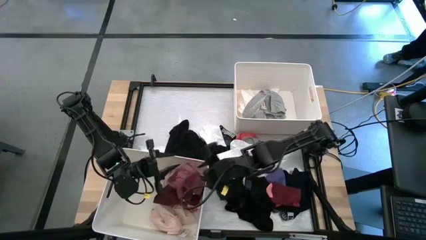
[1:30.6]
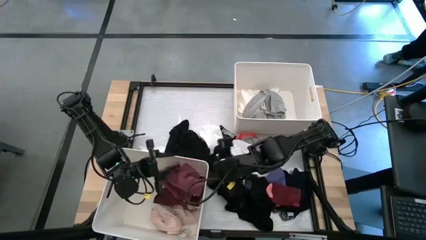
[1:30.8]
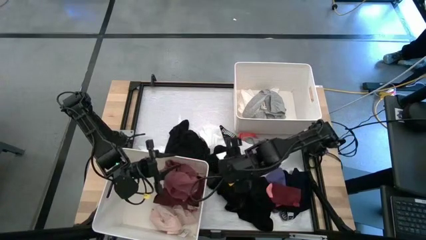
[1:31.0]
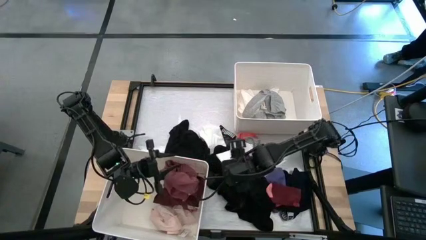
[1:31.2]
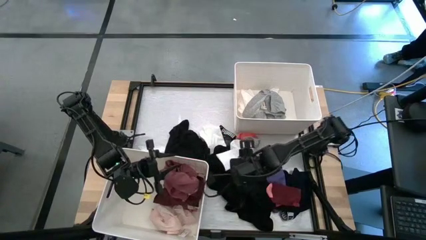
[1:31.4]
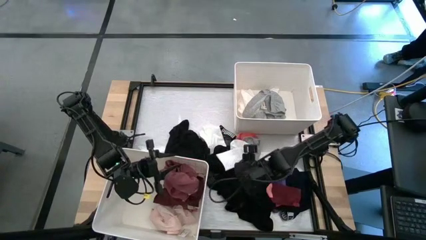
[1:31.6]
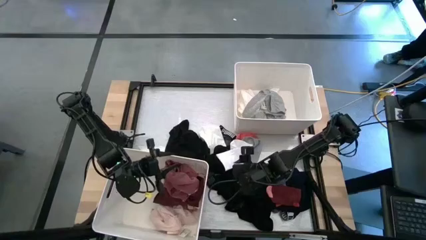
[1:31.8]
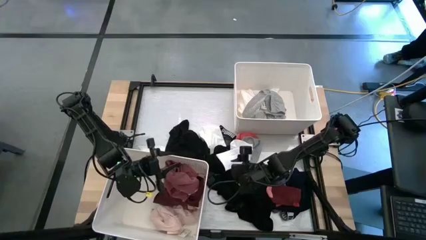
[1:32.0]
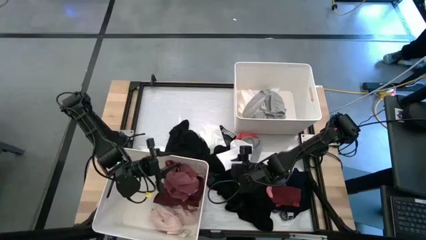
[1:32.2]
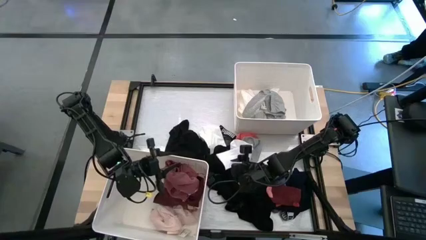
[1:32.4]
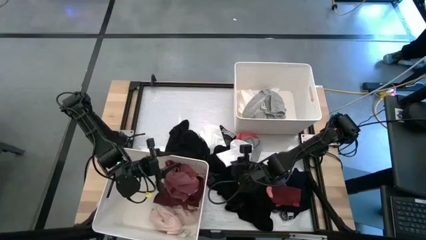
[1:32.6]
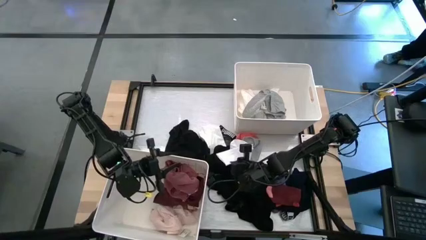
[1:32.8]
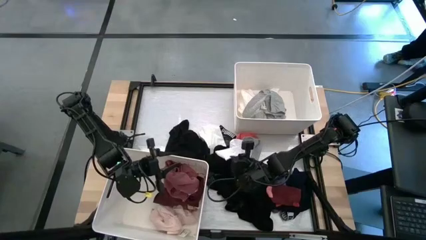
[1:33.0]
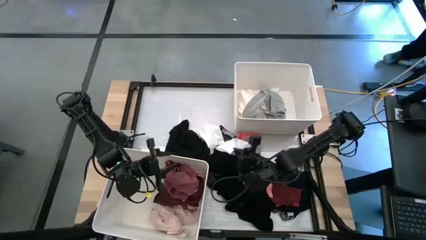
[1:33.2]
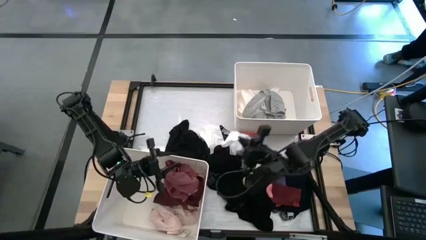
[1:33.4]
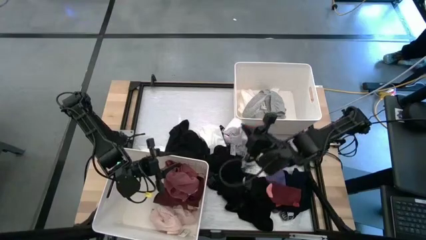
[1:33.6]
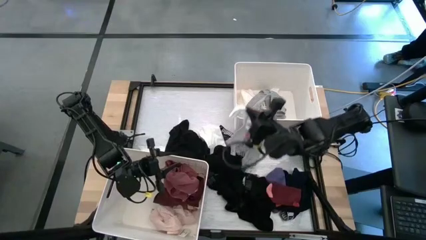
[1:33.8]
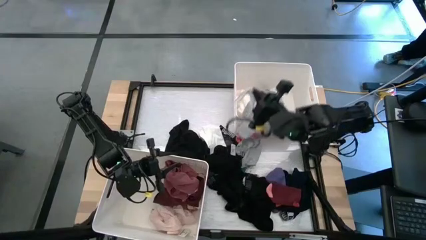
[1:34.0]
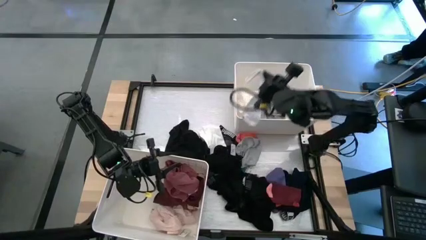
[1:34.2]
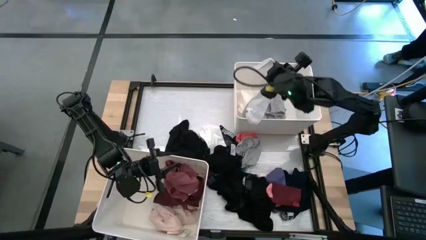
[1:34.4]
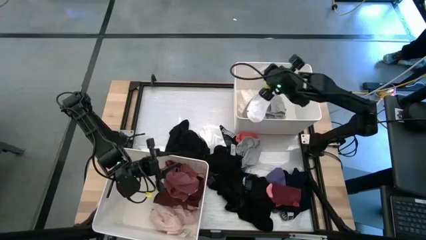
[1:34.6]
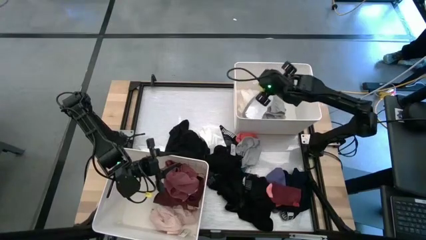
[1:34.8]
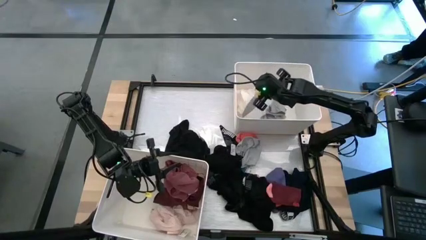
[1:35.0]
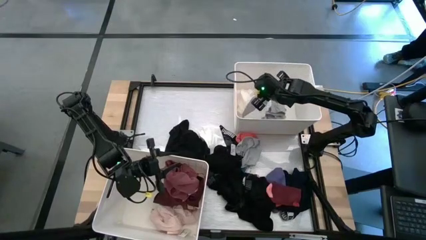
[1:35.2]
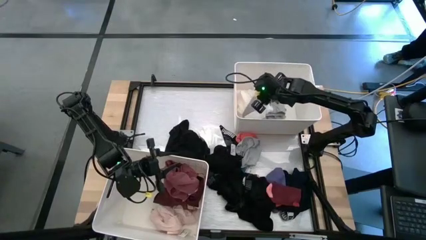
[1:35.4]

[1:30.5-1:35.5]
Task: Sort clothes
Put the white sock into the top white bin

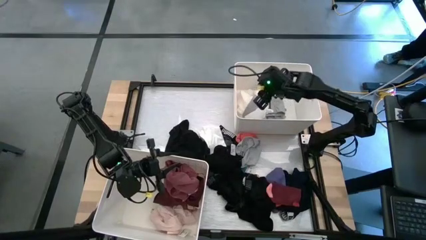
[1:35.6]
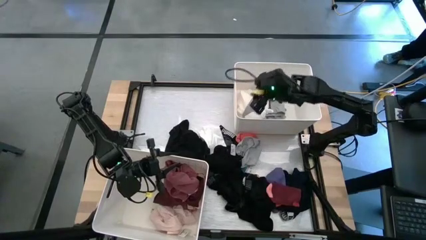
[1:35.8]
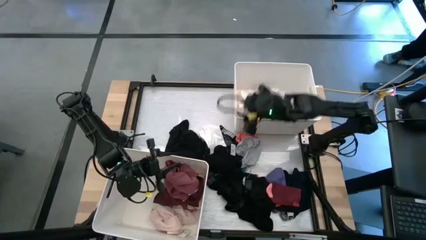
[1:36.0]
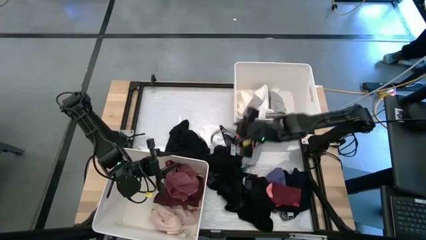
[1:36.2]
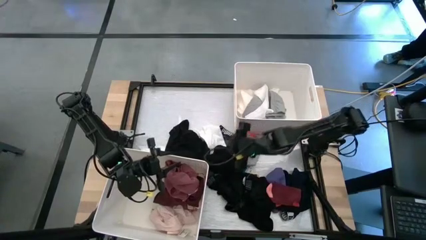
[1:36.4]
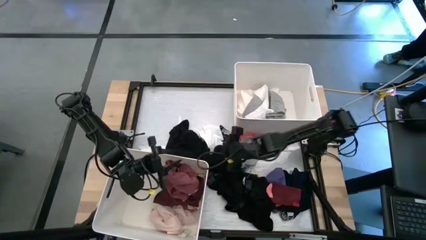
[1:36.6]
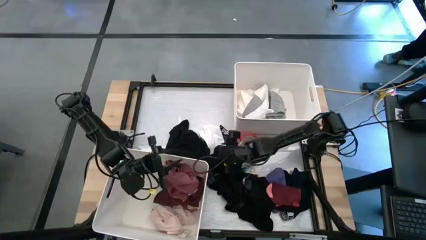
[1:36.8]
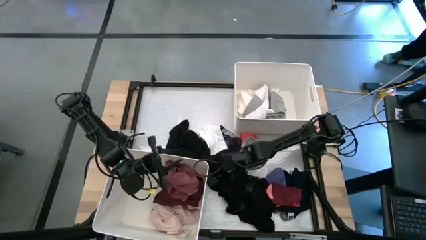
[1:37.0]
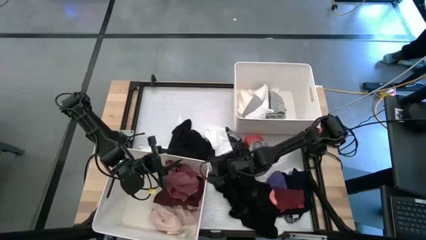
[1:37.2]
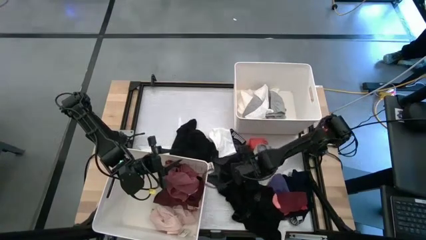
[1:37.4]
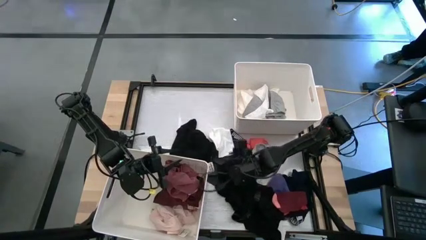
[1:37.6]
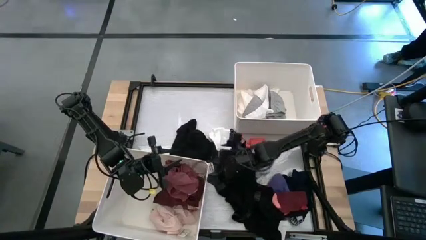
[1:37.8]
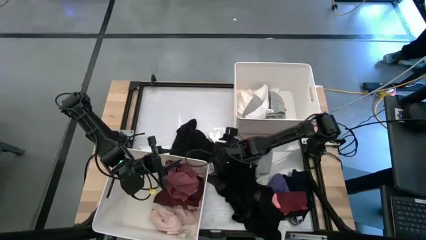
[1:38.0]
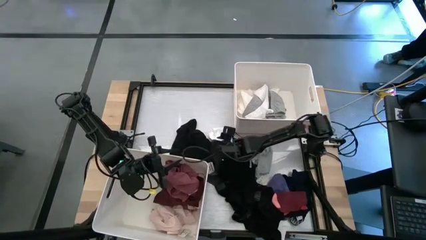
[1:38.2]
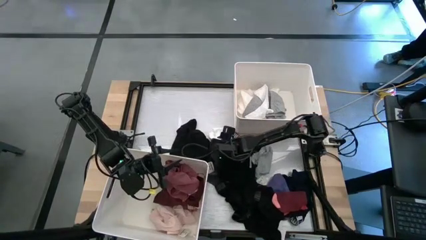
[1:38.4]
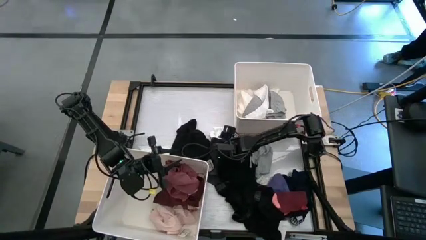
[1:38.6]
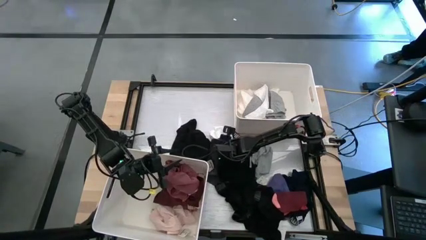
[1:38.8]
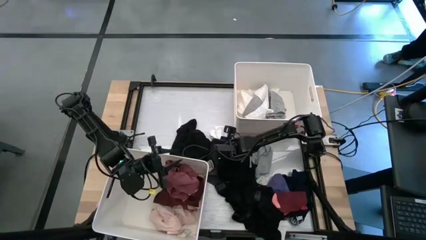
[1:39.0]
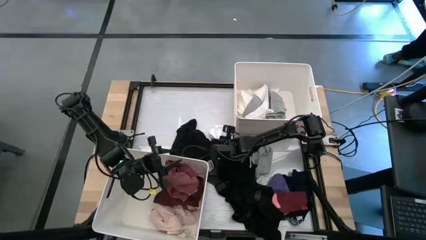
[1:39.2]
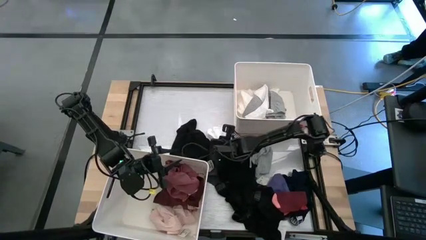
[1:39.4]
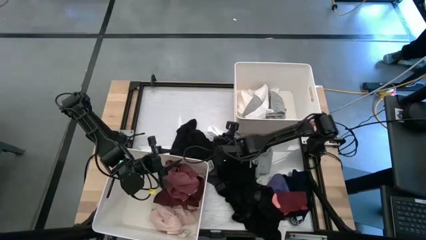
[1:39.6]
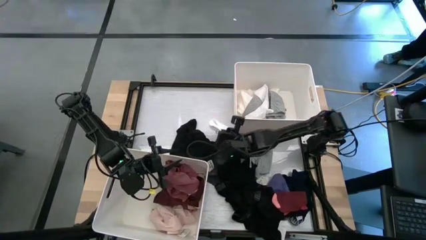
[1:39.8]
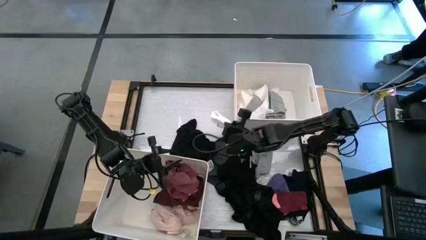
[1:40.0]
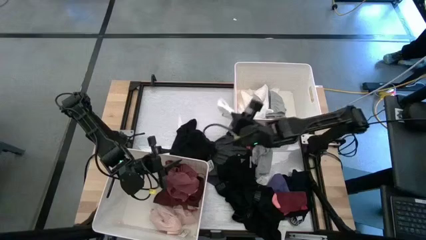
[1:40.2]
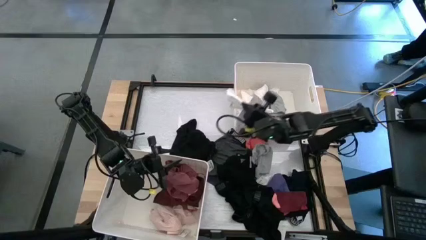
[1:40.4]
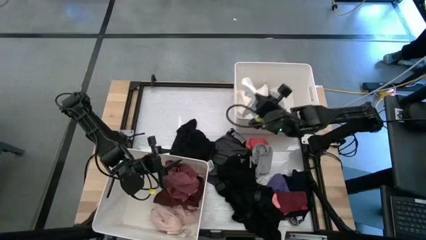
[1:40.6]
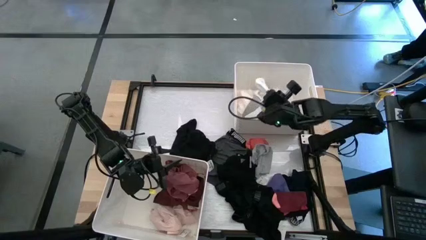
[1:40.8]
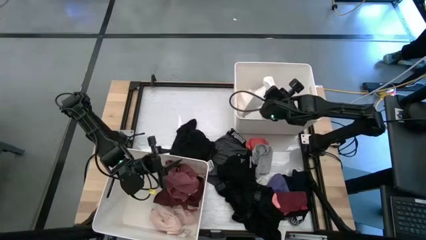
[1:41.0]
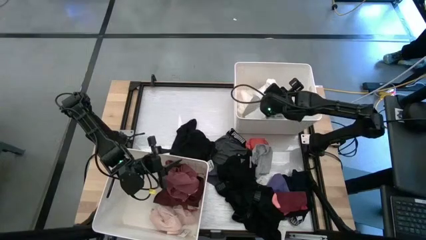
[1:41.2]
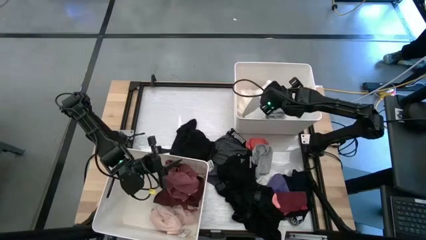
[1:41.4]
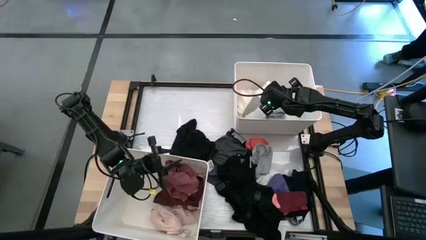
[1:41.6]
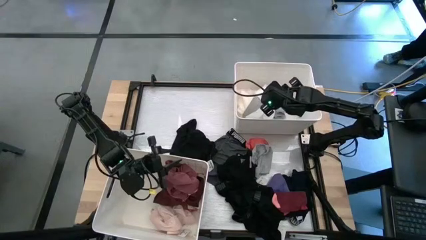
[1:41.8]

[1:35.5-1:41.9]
Put the white sock into the top white bin

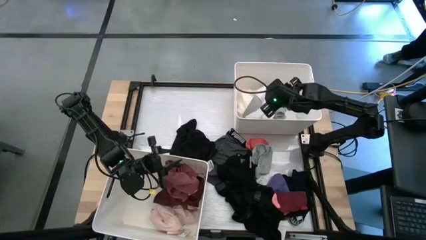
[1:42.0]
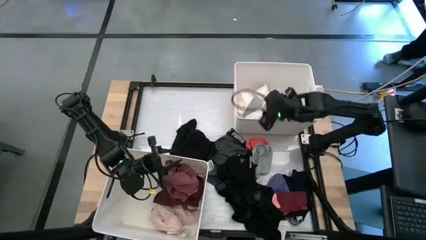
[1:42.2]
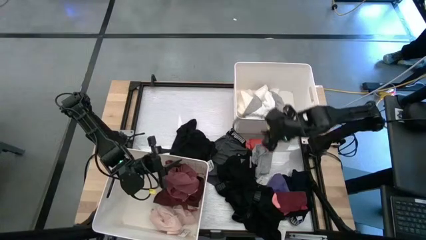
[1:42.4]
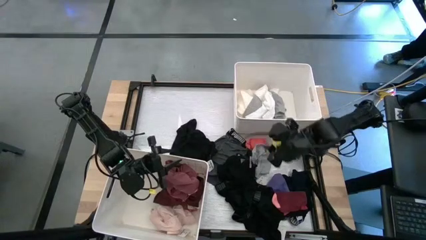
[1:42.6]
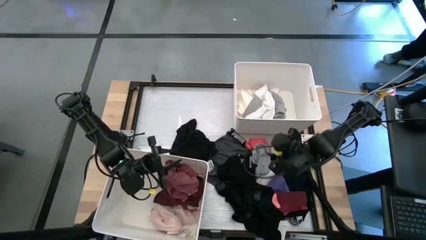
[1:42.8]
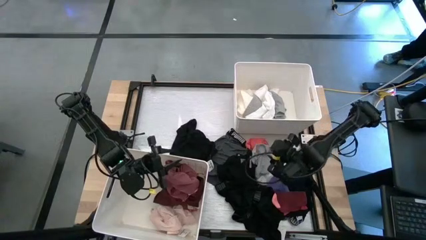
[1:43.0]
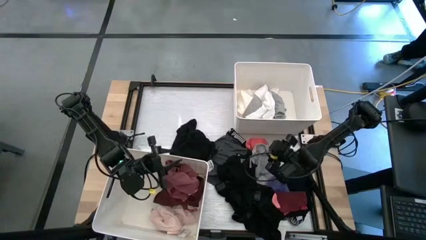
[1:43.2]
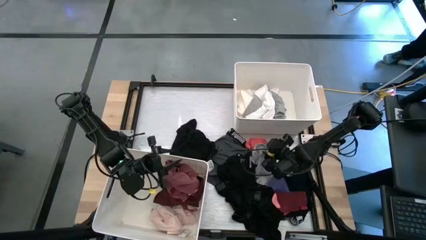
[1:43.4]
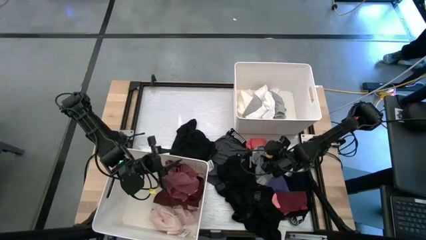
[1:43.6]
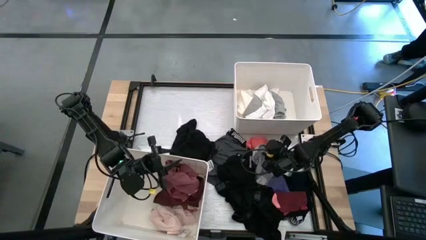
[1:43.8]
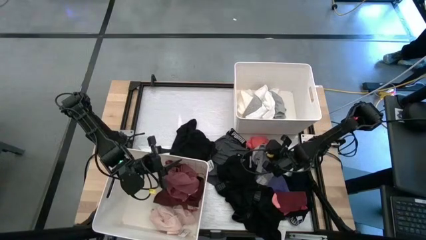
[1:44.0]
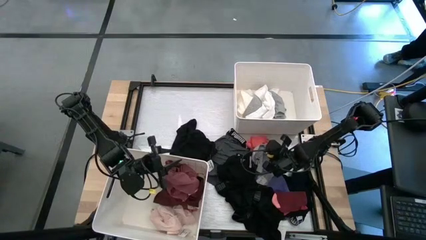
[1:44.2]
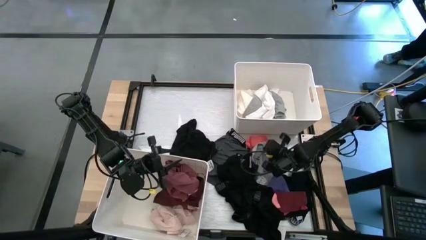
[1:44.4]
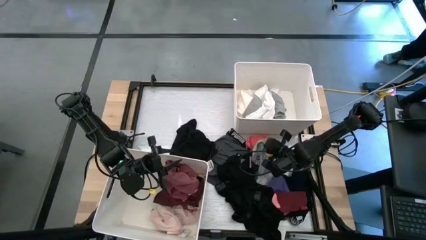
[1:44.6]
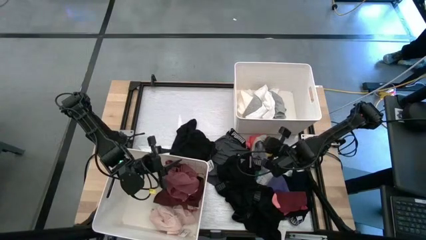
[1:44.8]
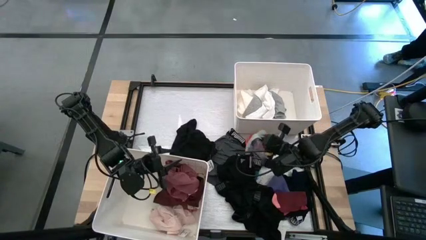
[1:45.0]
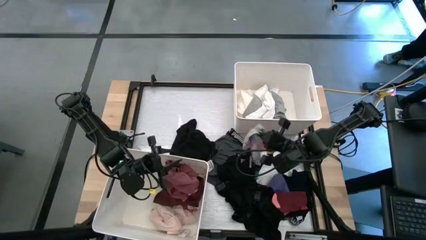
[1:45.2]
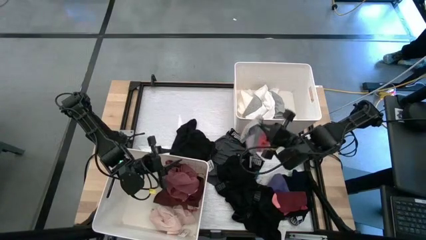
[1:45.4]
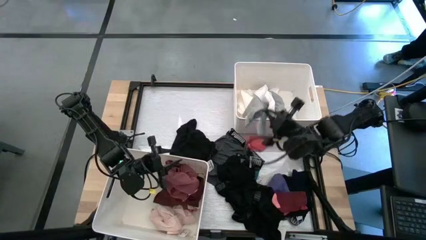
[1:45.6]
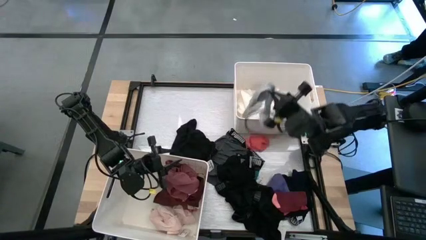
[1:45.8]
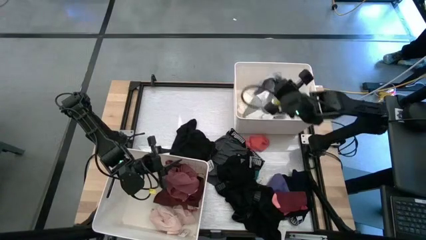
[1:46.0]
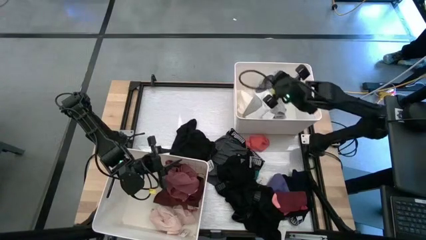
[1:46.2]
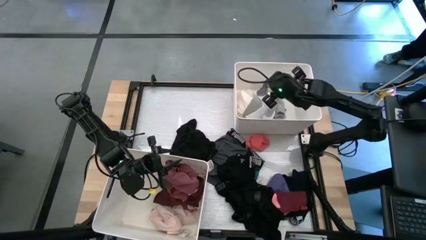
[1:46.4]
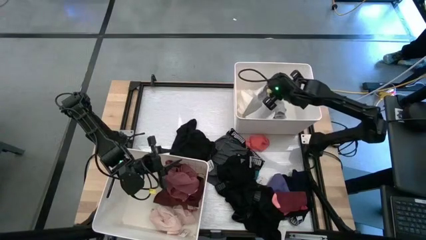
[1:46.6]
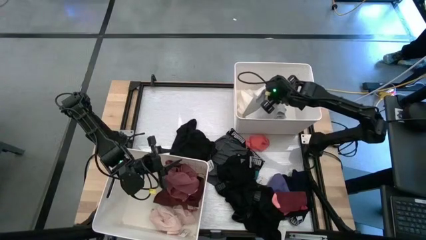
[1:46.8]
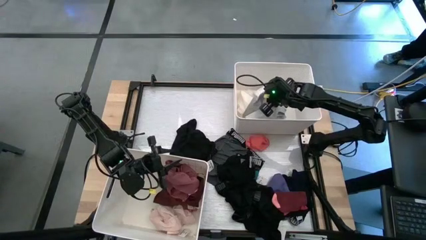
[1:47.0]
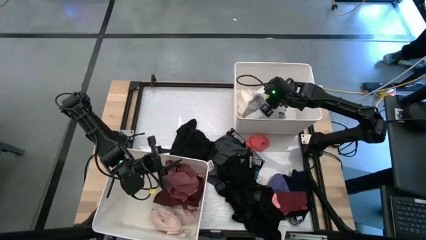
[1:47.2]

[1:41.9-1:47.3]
Put the gray sock into the top white bin
